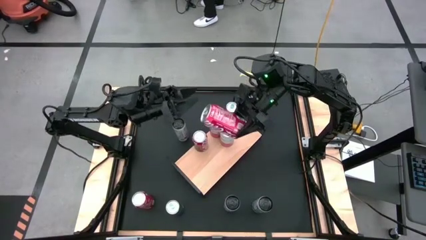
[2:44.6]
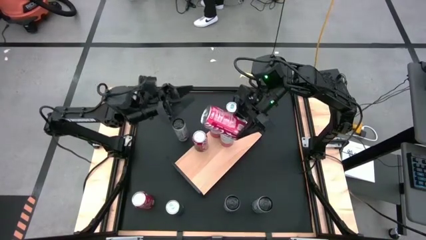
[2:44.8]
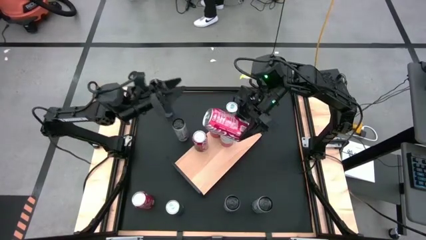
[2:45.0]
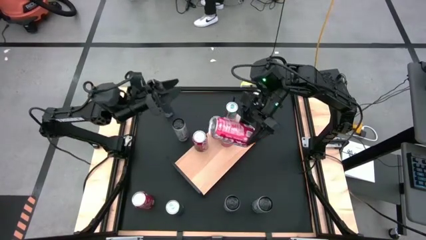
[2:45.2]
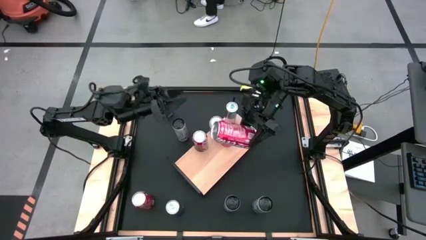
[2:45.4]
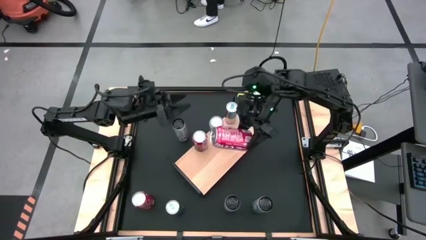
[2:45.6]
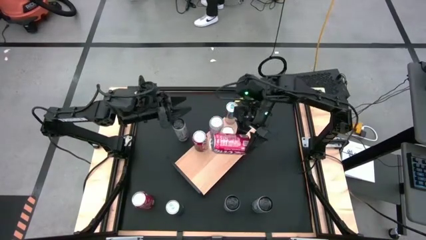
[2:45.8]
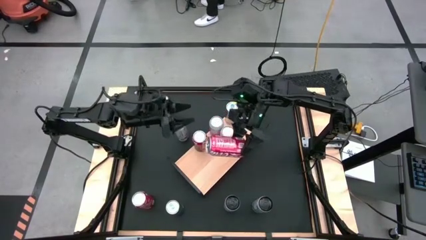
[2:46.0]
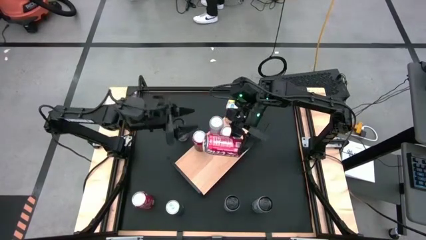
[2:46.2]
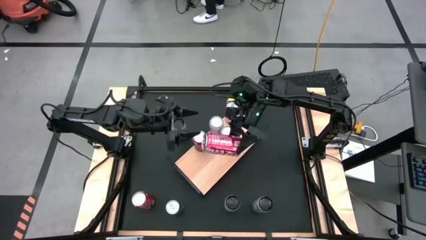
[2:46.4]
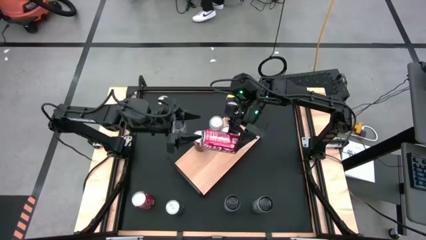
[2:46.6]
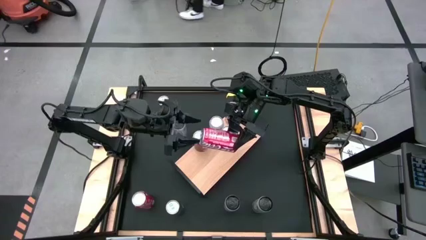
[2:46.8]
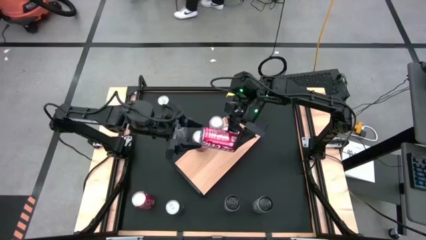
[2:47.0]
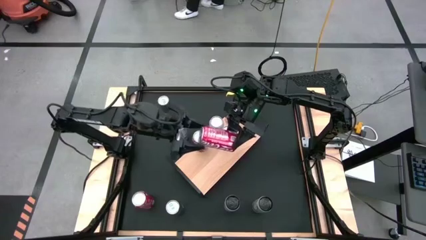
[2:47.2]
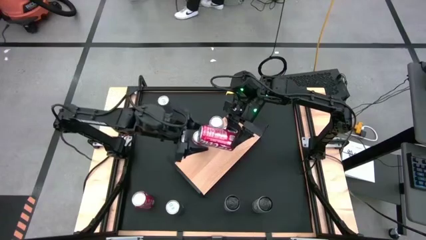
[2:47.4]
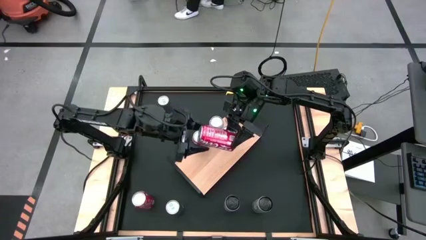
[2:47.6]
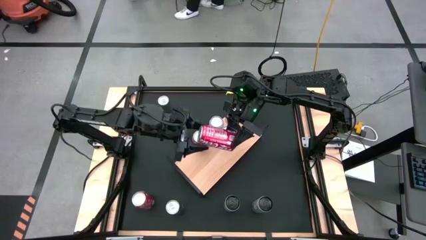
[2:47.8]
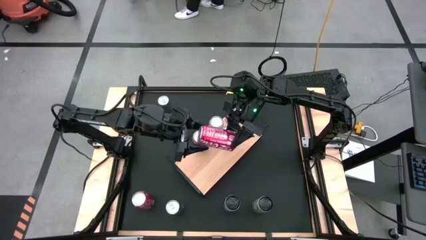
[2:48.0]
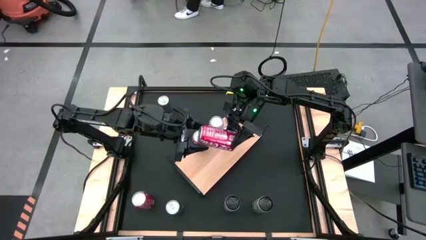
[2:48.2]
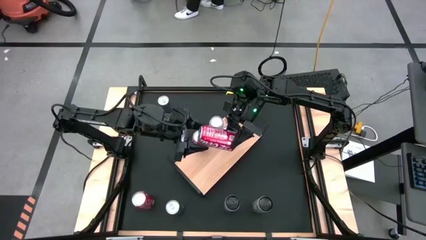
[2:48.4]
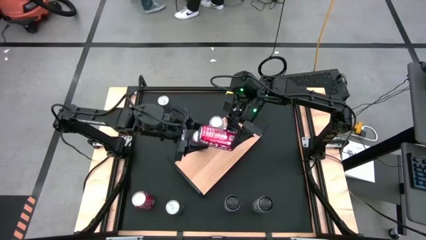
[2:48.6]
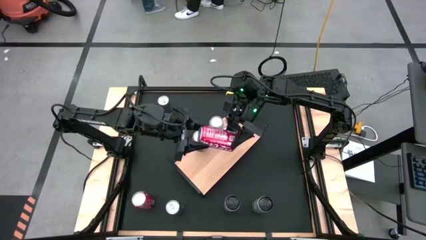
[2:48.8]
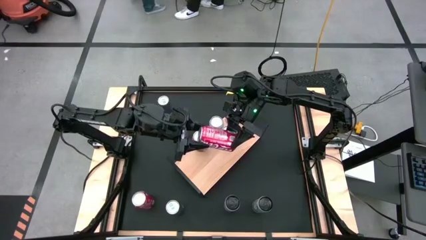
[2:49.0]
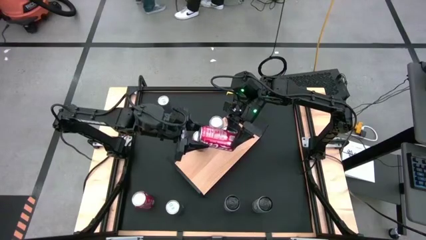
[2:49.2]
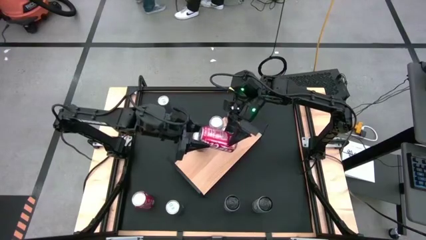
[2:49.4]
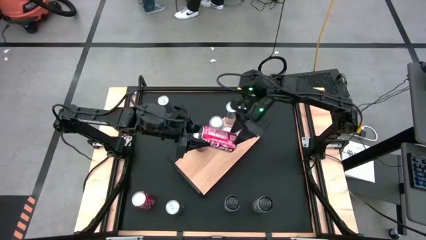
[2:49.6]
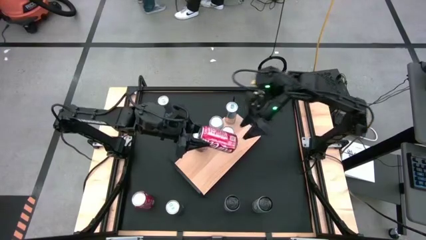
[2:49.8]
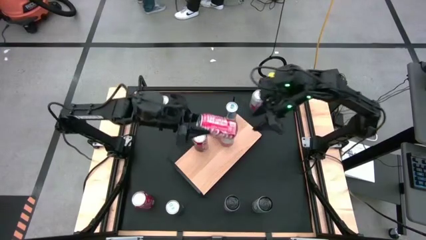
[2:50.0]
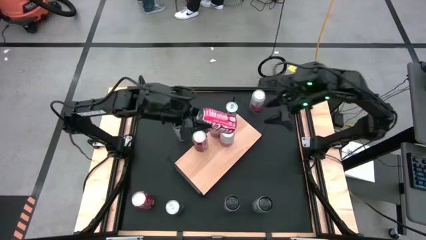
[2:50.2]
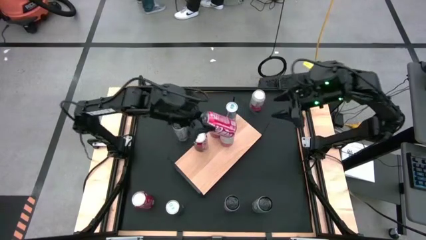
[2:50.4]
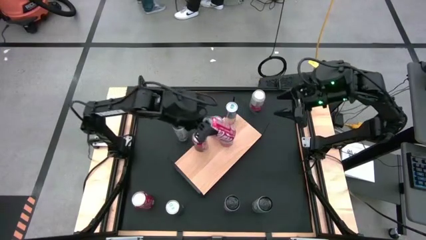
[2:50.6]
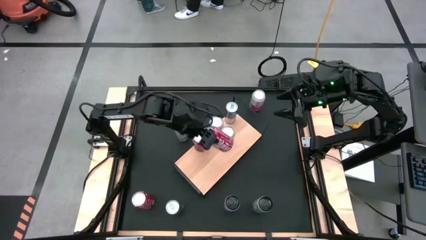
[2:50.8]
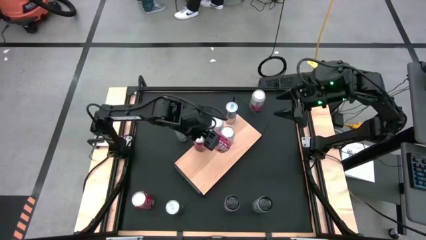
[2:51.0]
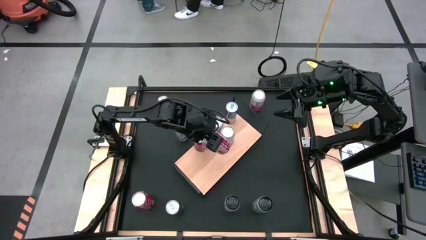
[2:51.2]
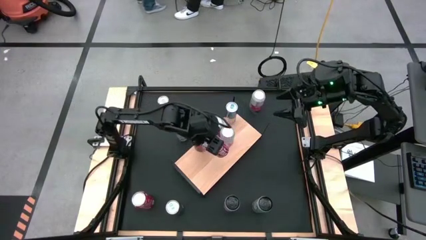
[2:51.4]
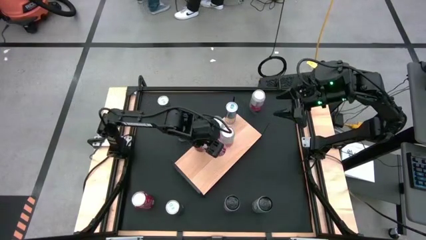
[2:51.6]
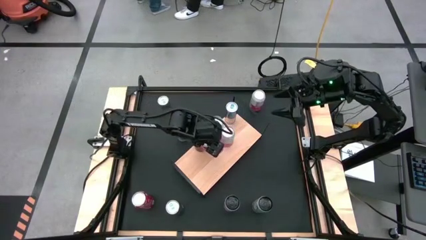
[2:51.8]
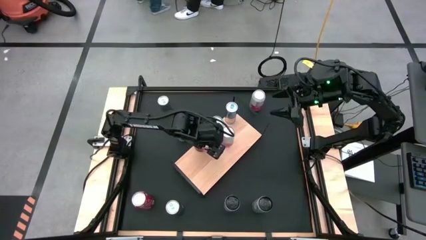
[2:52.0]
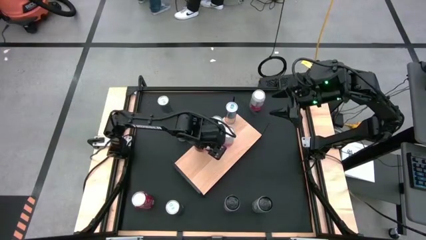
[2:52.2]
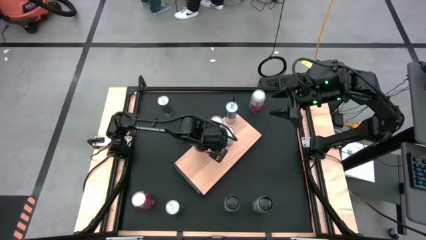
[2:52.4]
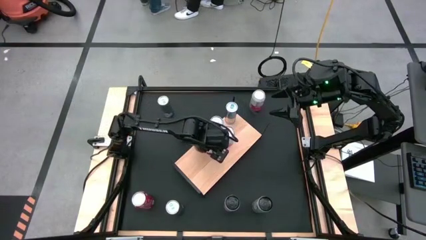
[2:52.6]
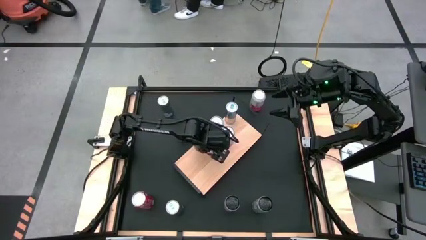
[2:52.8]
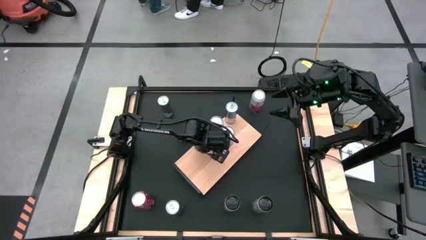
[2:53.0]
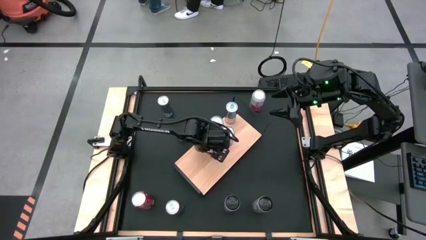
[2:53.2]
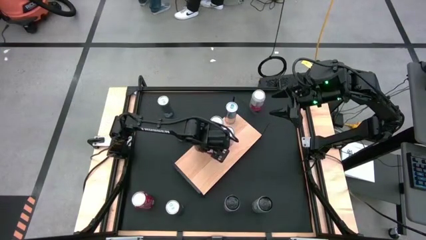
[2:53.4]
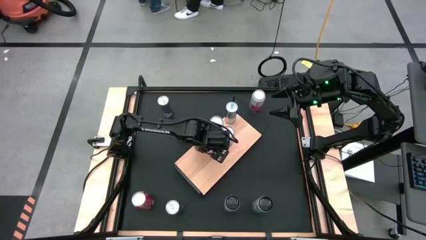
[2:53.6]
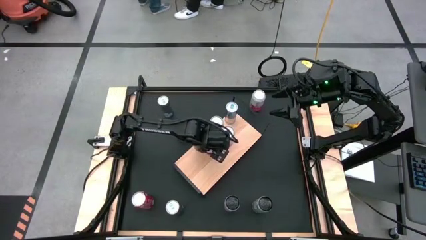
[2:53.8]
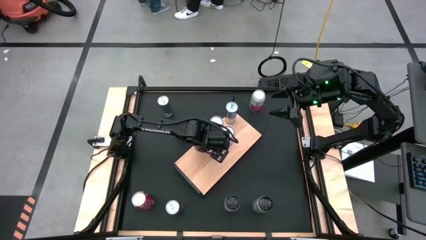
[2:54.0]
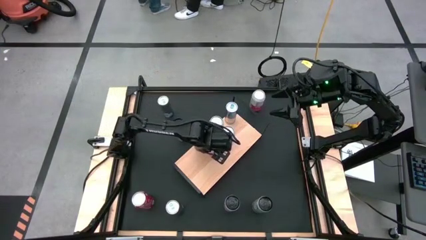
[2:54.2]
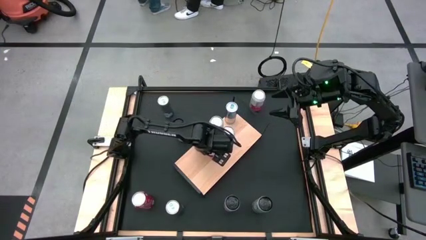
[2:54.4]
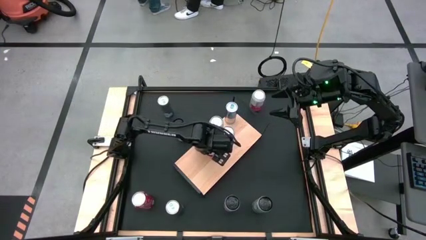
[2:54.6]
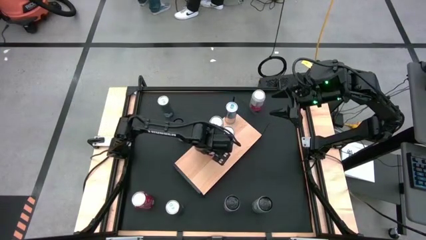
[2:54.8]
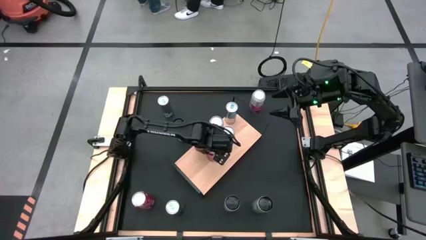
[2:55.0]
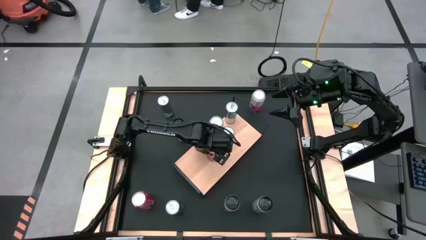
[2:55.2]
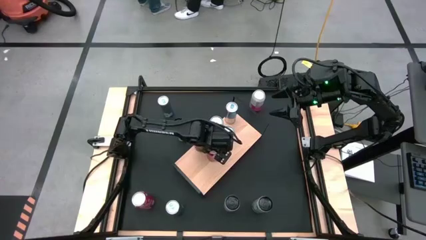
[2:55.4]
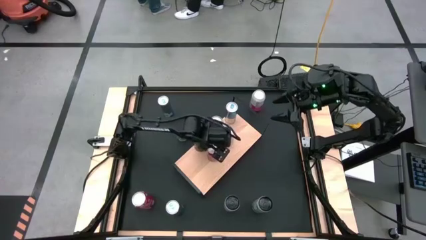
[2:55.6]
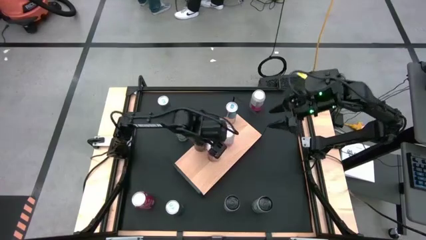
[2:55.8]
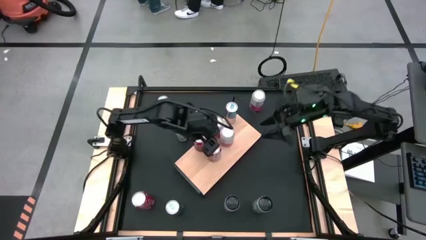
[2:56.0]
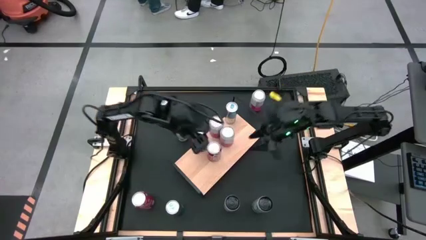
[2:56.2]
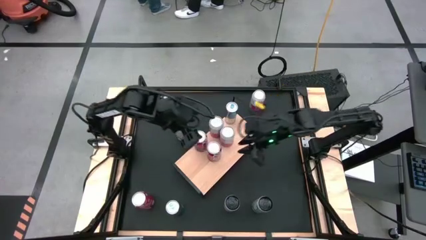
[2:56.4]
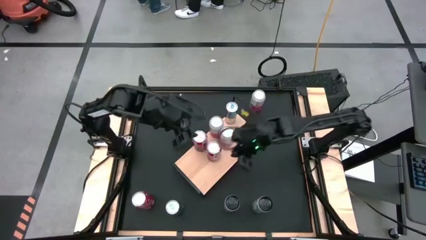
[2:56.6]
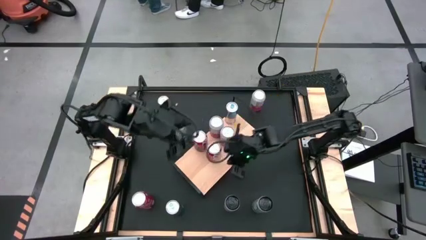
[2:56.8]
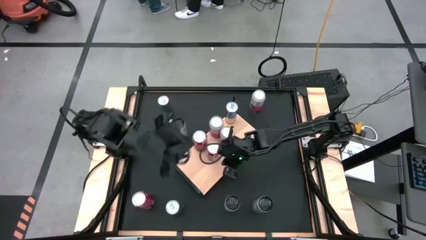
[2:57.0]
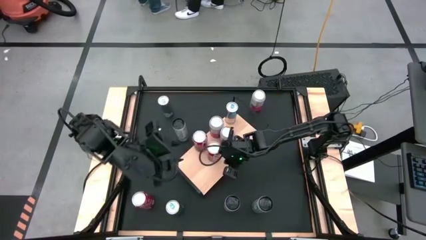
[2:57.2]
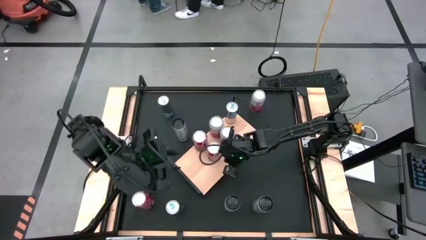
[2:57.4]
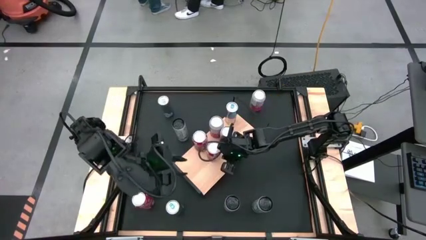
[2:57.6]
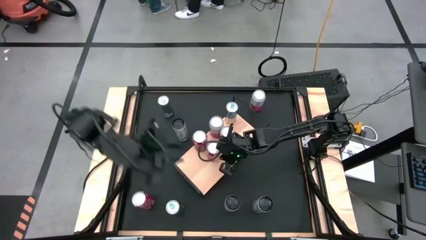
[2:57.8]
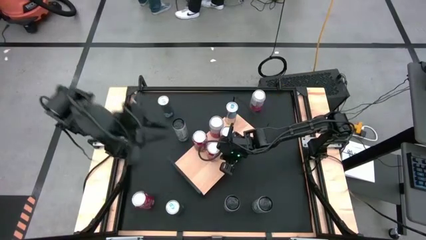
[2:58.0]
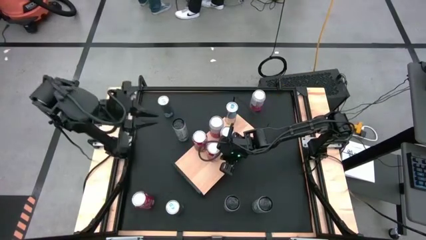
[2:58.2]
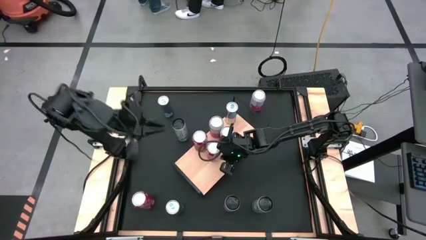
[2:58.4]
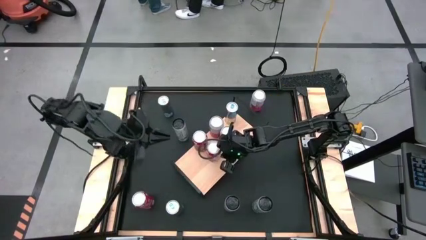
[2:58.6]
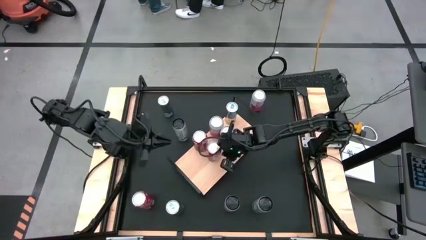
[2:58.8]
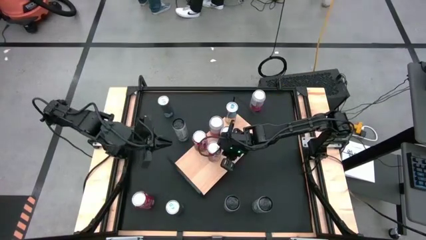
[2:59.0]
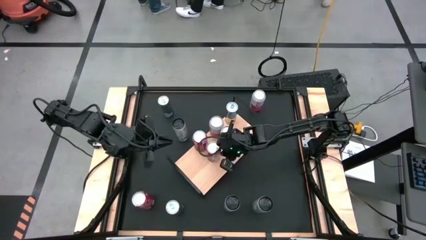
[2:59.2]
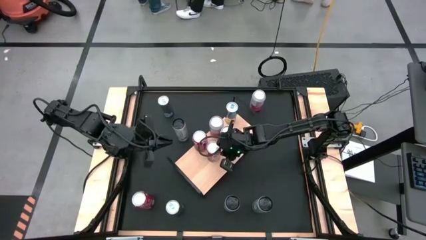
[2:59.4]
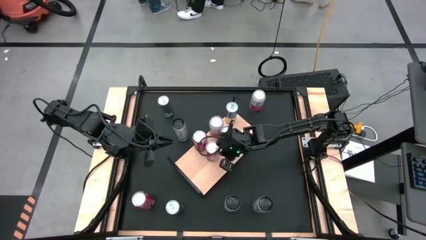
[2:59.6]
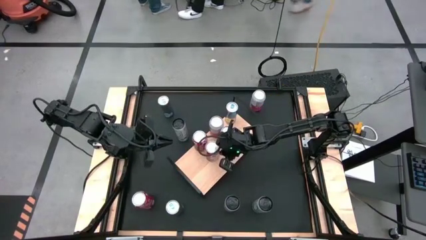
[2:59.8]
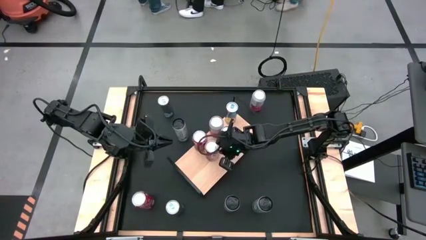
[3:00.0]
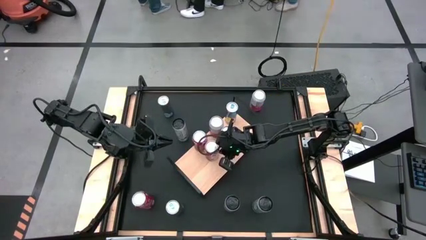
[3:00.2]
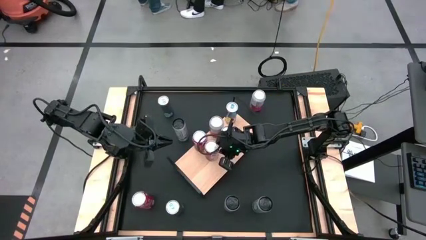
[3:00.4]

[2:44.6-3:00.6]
Task: Place canned beverage on shelf
Put the top red white soda can on the shelf aligned with the other red white soda can
